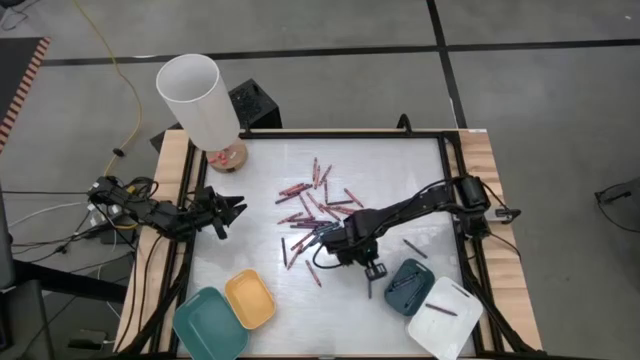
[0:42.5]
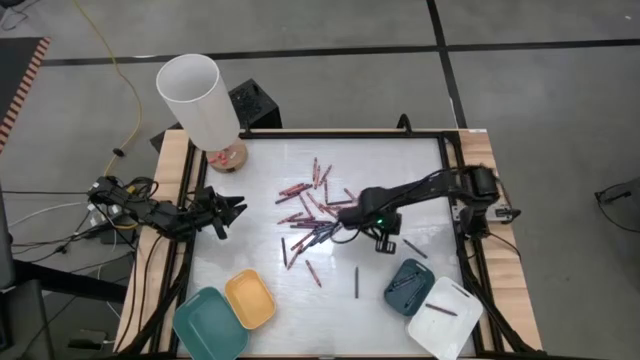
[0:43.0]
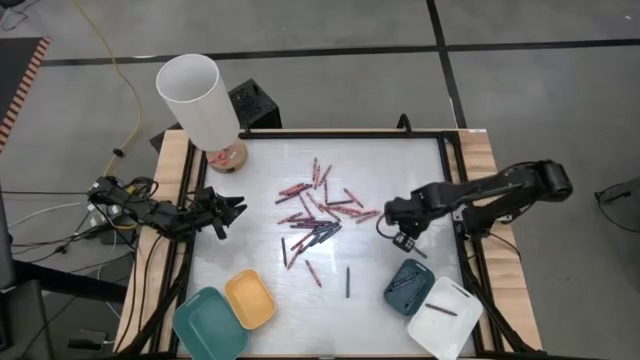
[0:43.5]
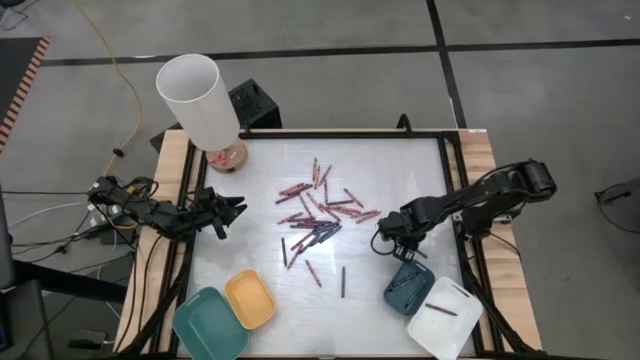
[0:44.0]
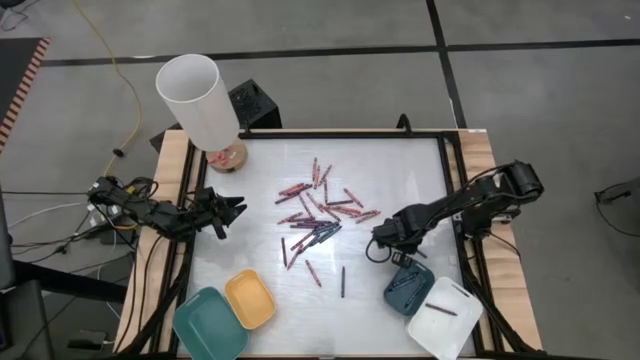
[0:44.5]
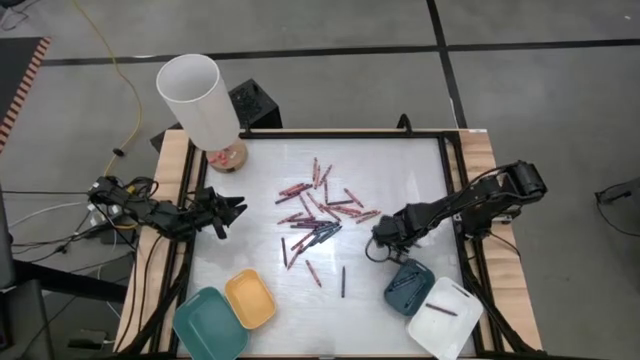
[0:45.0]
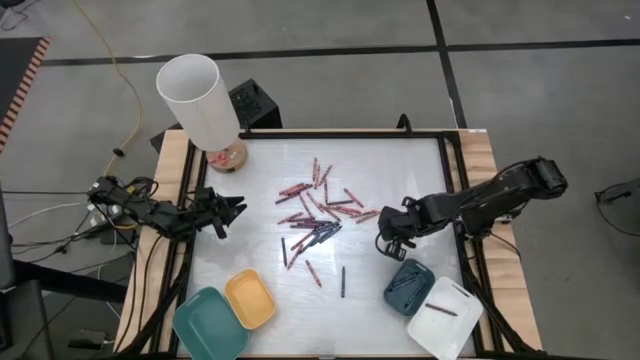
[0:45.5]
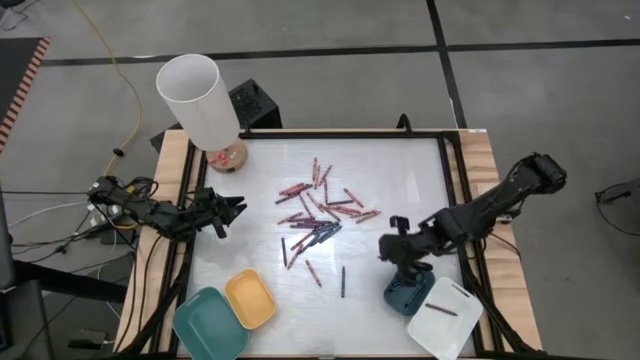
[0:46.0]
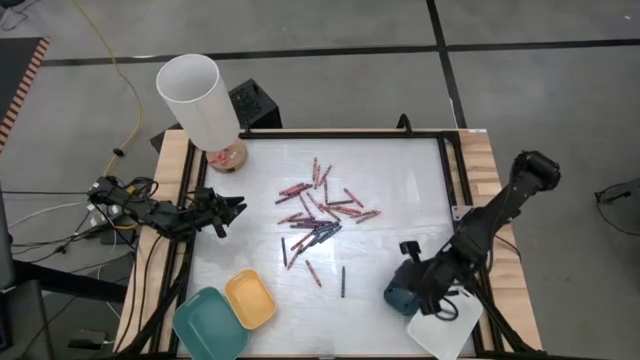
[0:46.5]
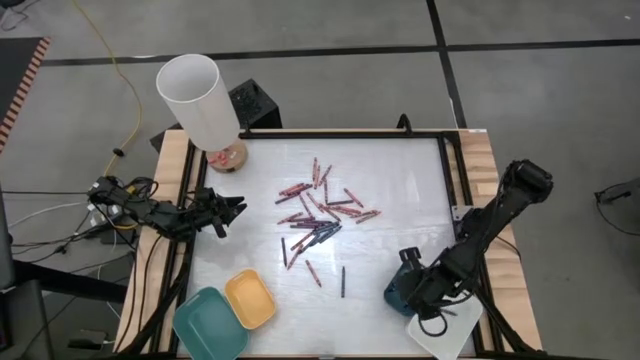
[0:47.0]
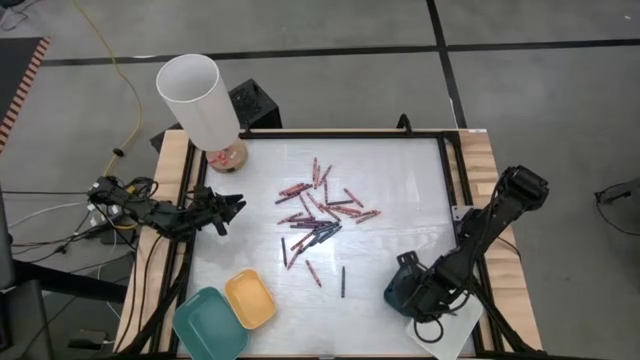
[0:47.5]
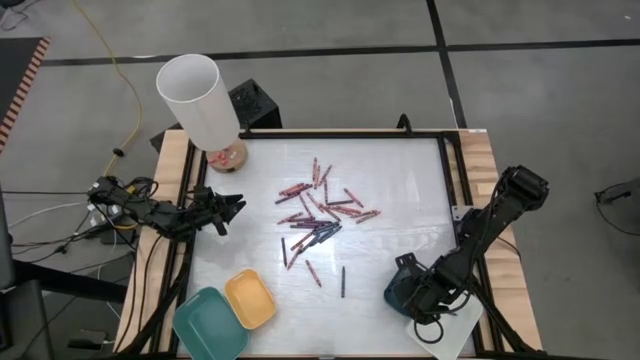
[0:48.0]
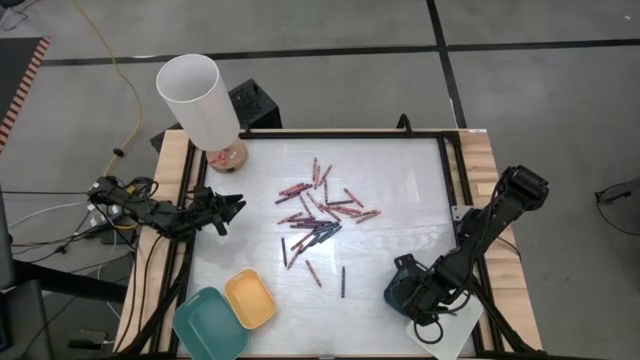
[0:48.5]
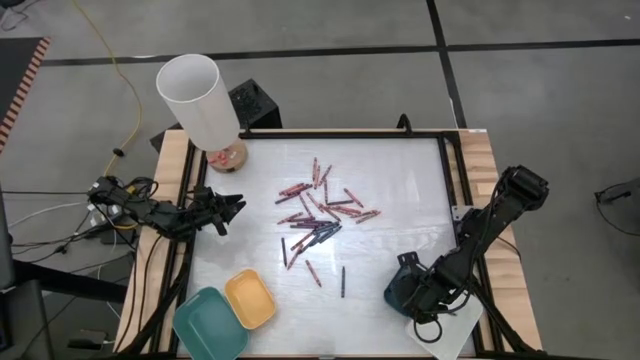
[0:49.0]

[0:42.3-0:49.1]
Task: Sort crayons
Put the blue crayon into the dark blue bin

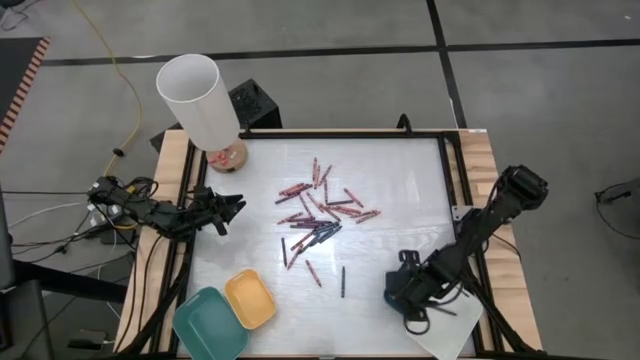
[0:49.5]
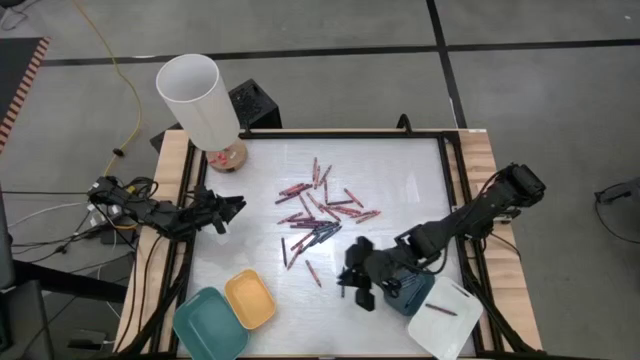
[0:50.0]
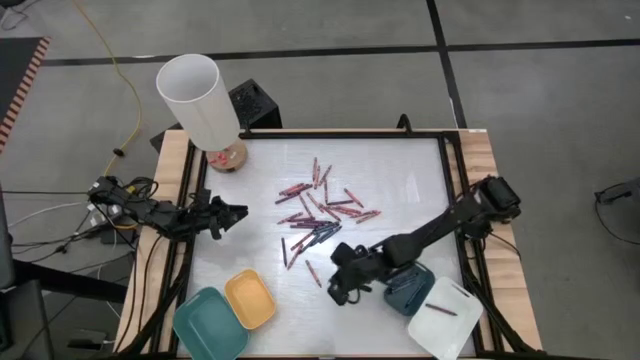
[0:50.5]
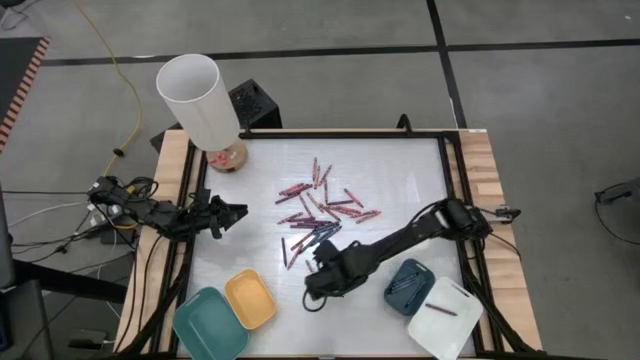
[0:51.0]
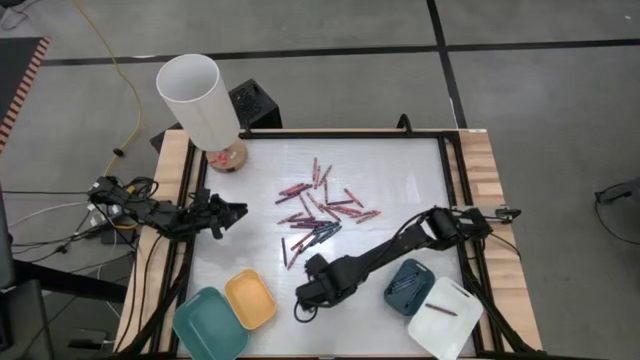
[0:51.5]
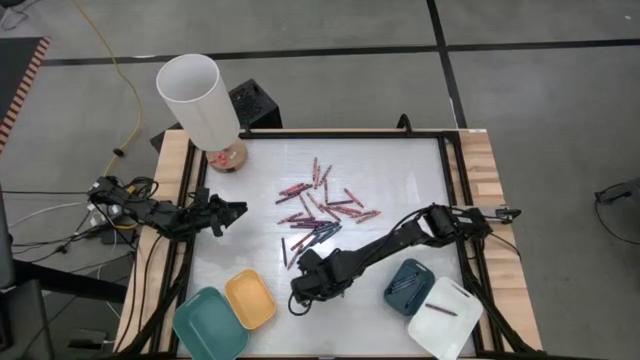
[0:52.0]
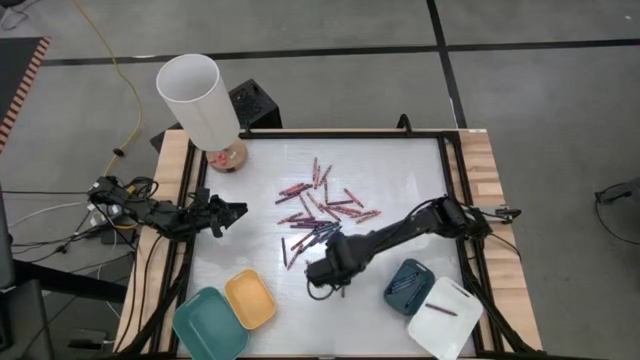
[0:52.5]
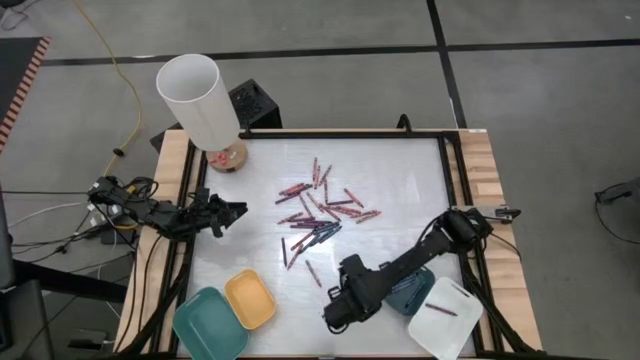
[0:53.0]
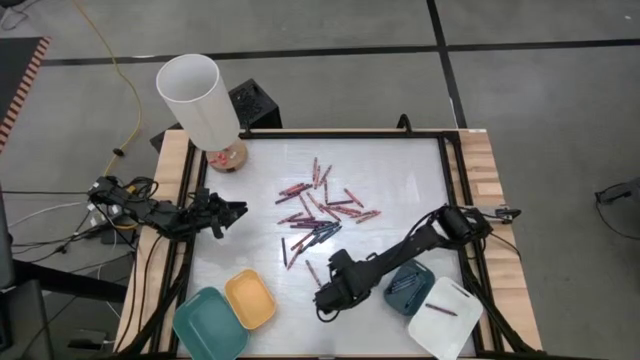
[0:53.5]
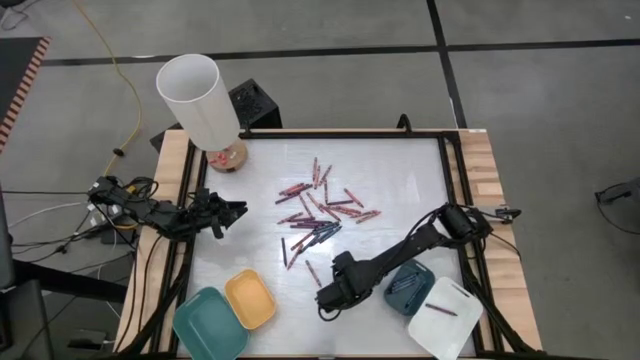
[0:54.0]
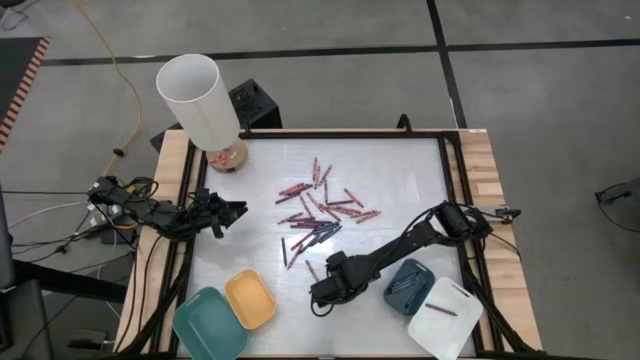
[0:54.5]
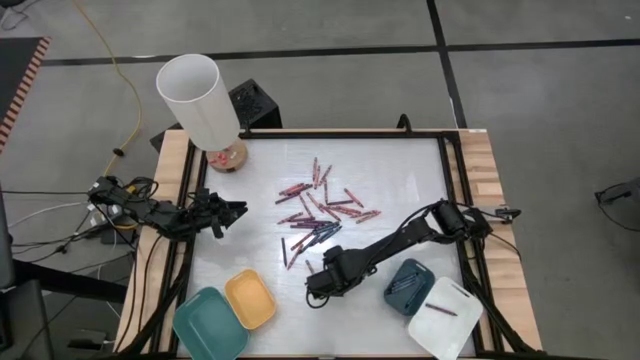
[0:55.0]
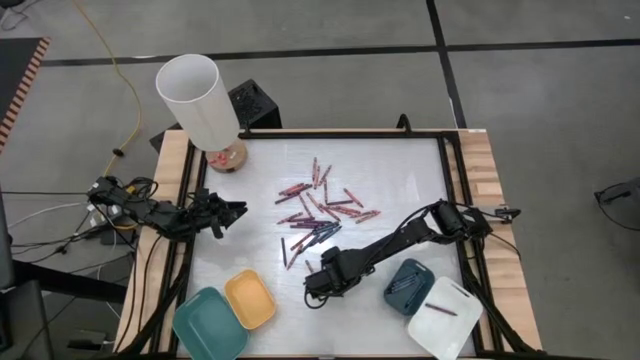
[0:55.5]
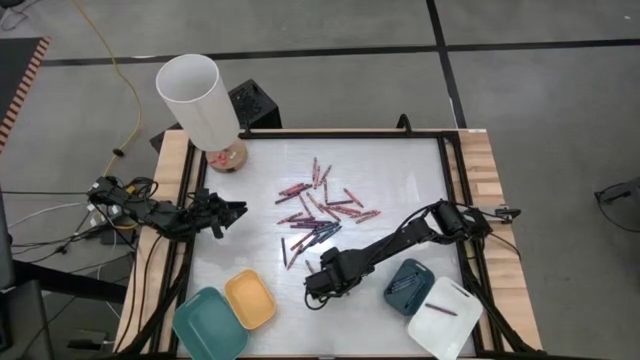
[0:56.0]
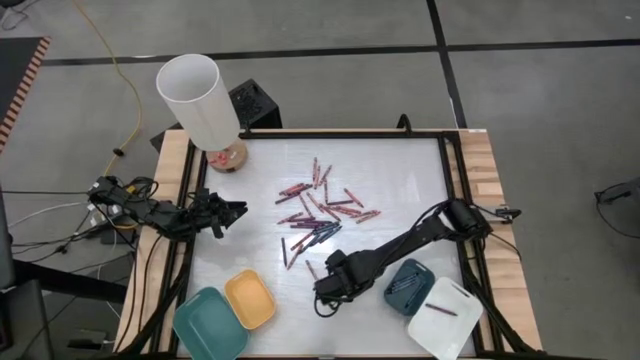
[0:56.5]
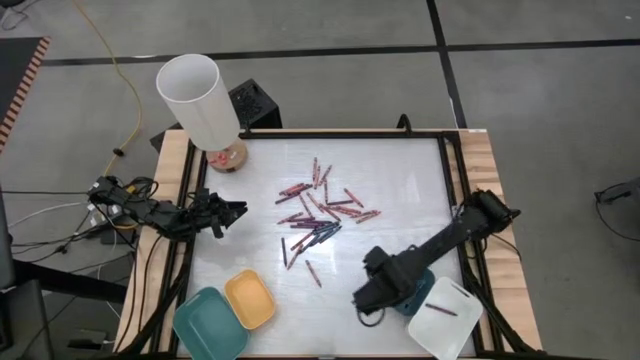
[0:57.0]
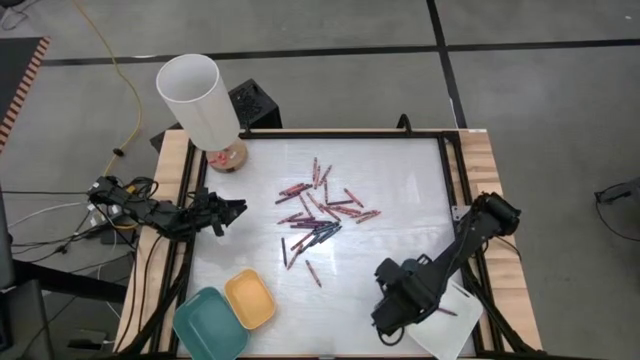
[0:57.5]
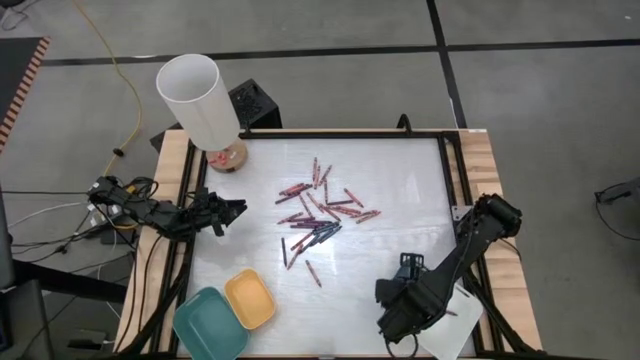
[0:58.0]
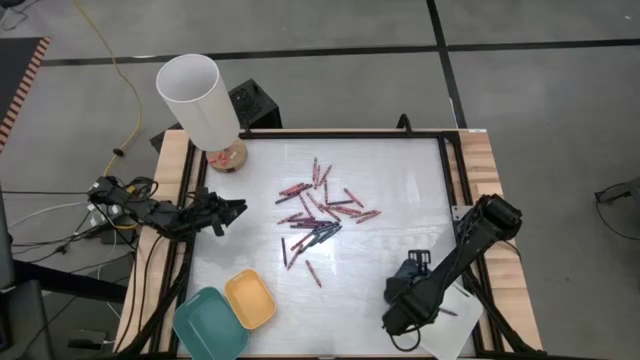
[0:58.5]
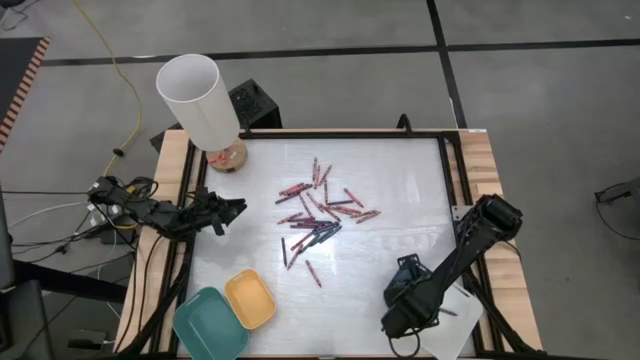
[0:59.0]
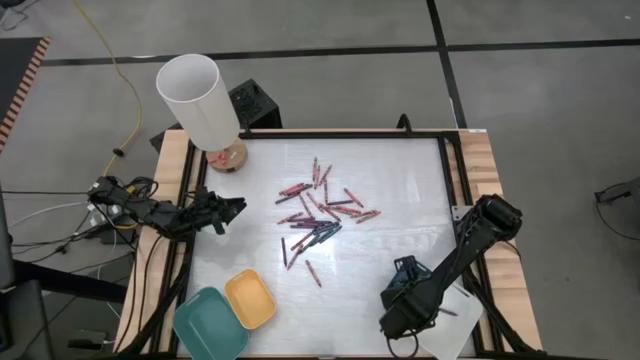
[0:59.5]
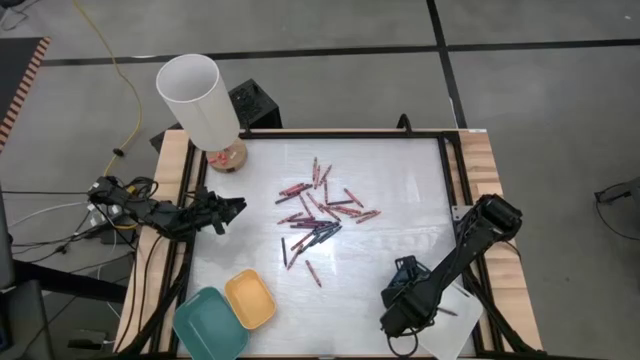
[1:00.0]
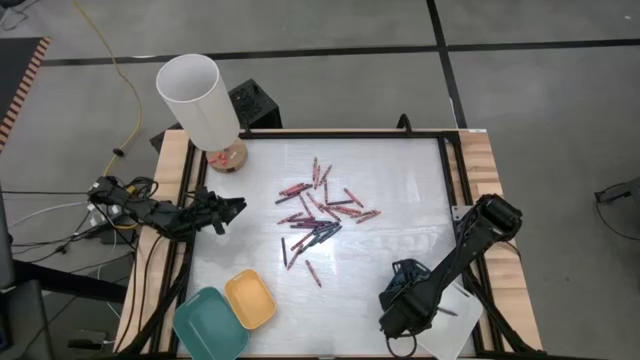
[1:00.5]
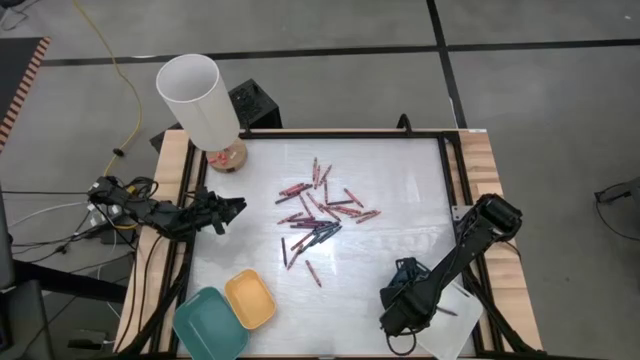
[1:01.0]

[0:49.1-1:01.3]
Put the blue crayon into the dark blue bin
